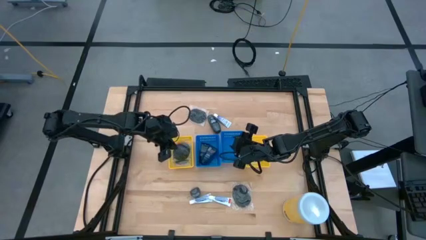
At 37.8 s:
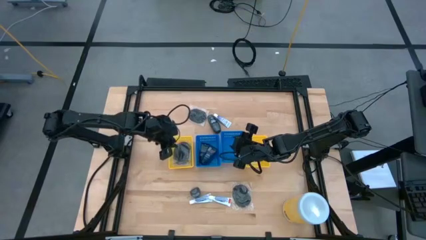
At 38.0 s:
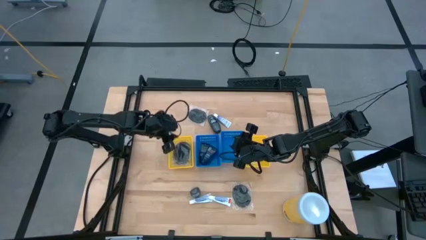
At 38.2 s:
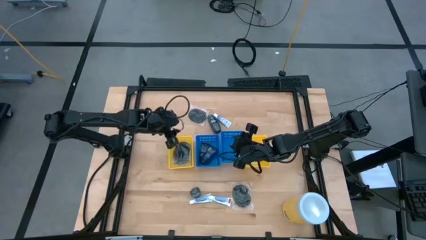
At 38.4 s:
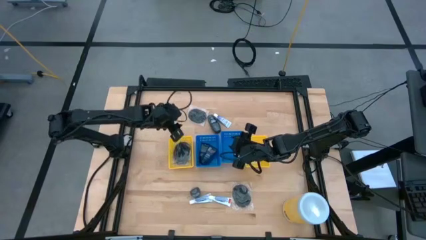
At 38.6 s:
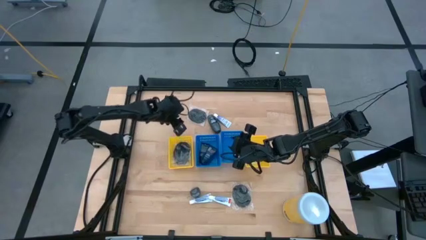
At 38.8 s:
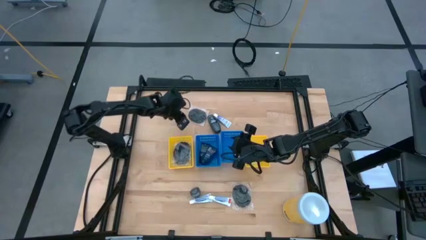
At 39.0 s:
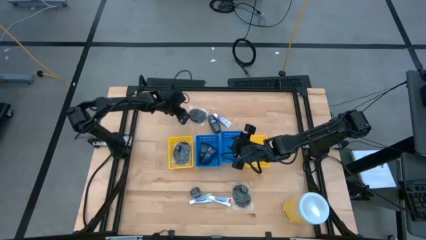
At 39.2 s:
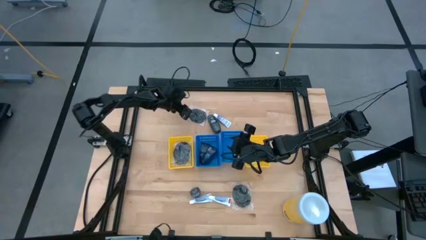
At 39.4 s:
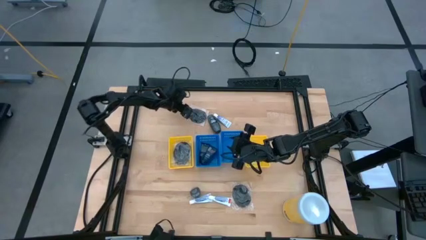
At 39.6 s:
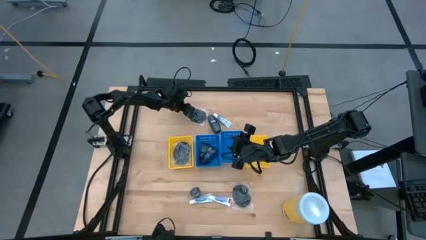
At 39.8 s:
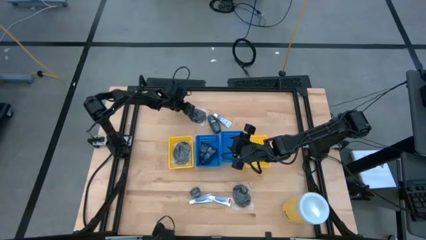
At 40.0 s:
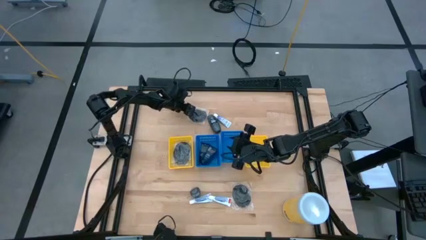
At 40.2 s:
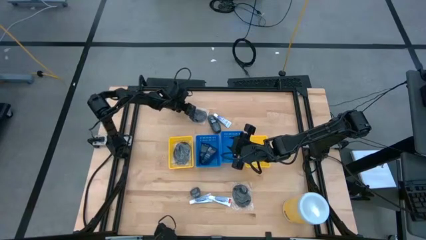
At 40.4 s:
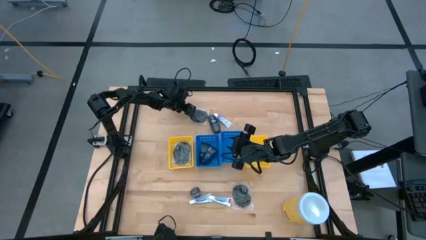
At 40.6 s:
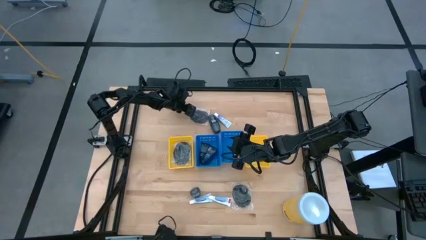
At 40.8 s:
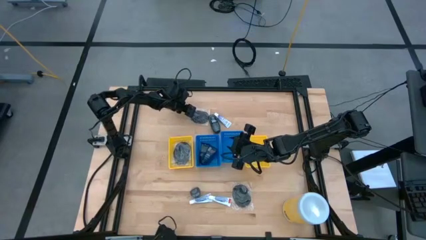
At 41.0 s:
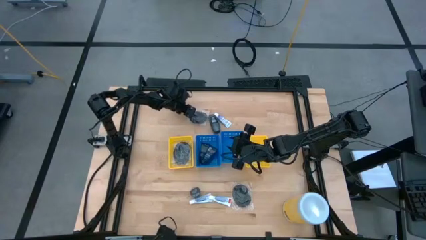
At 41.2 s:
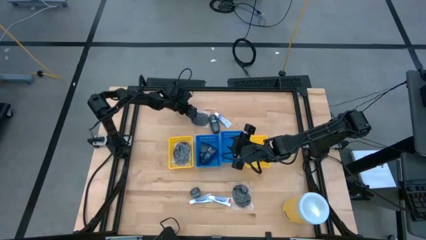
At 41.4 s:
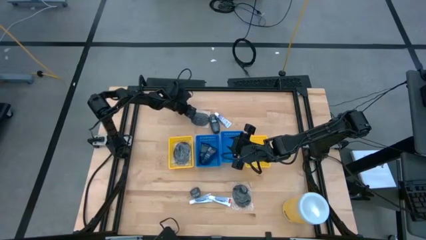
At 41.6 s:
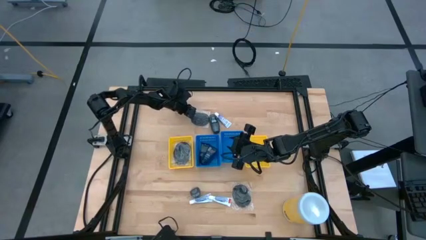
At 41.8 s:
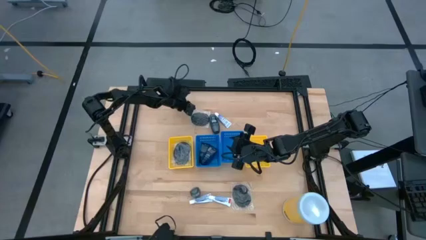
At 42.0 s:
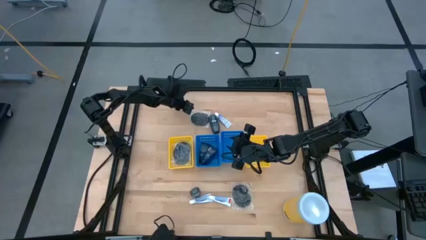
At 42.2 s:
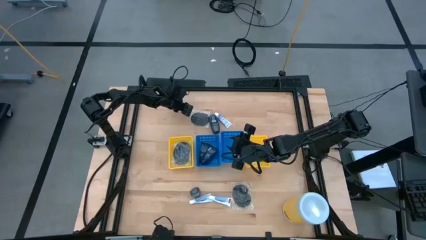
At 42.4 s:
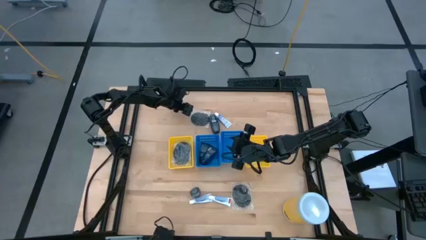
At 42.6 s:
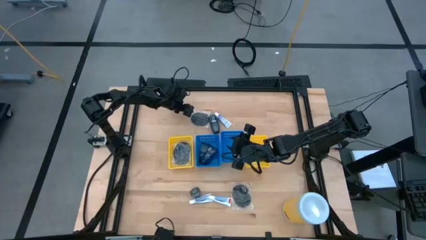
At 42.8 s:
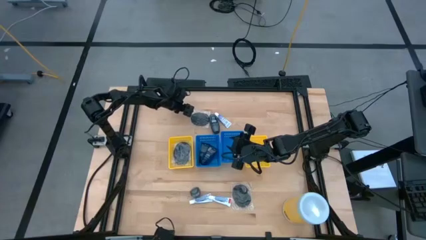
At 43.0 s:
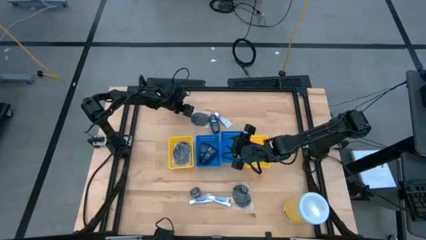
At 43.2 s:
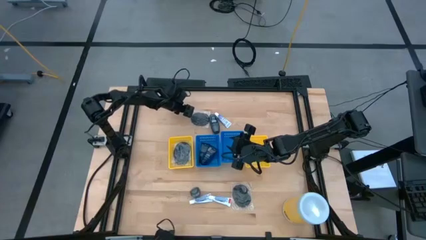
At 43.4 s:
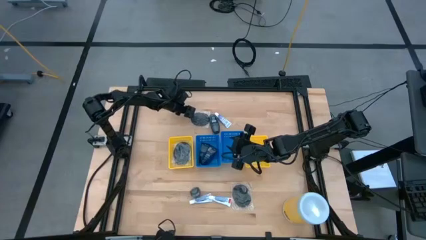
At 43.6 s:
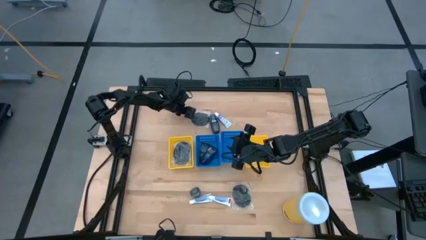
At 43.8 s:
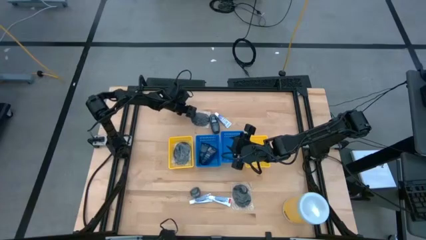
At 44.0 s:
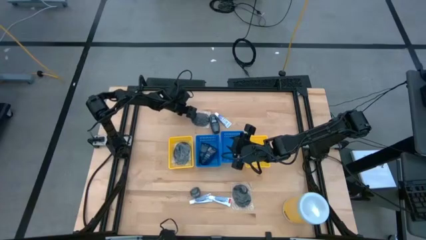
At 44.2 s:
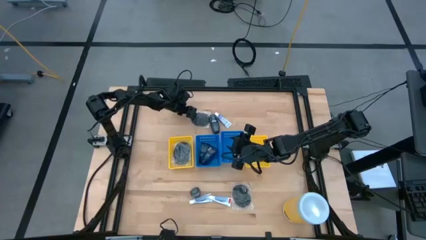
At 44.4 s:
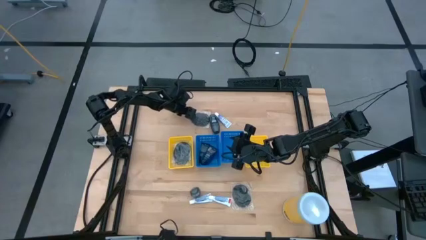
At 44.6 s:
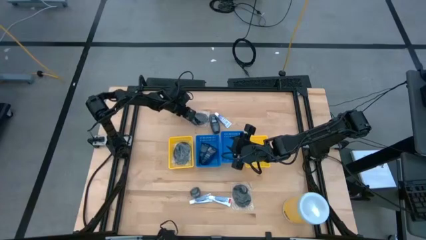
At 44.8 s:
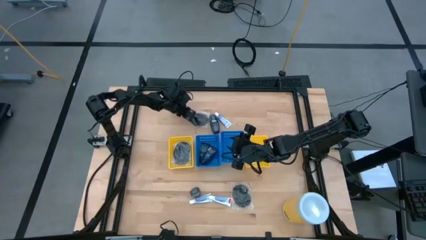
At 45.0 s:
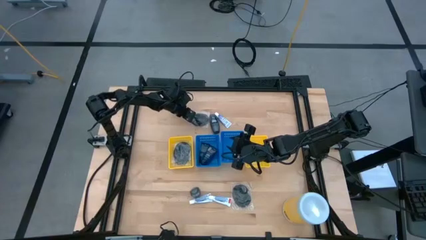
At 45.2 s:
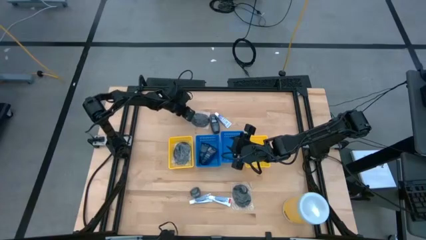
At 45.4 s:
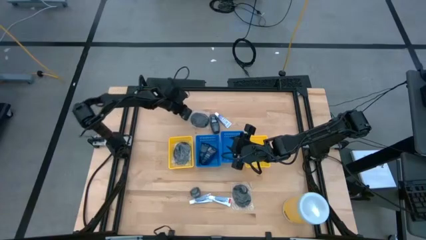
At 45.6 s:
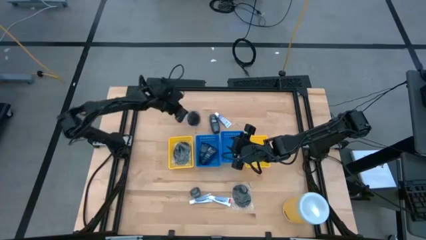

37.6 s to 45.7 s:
Task: Pick & Place Travel size toiletries
Put the hairbrush into the left yellow bin

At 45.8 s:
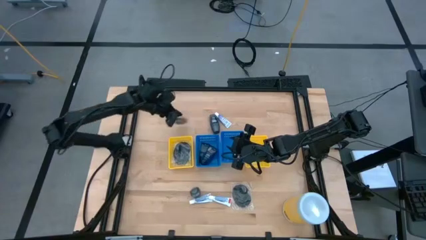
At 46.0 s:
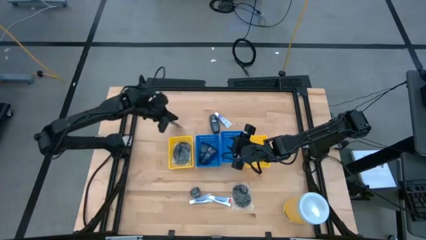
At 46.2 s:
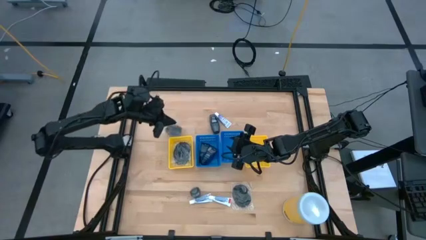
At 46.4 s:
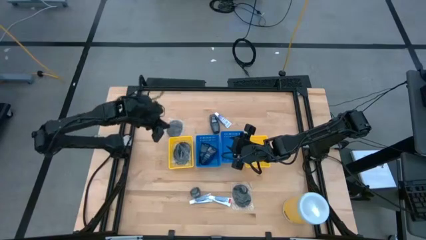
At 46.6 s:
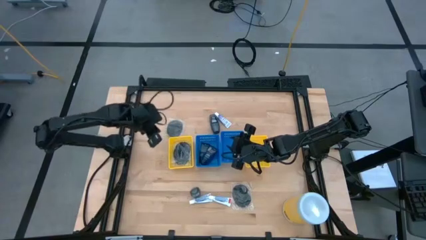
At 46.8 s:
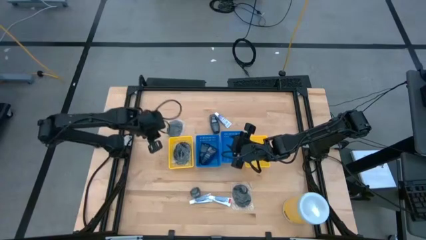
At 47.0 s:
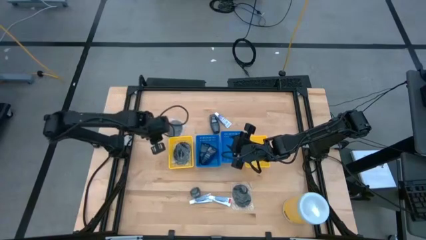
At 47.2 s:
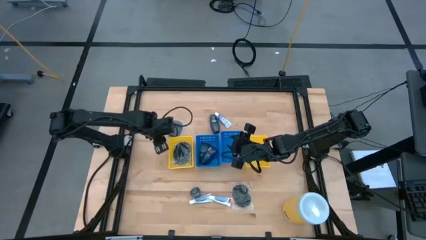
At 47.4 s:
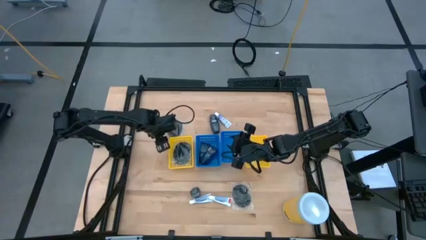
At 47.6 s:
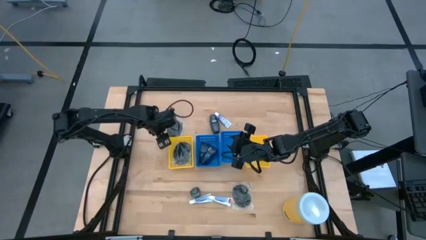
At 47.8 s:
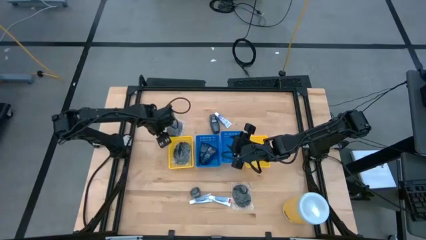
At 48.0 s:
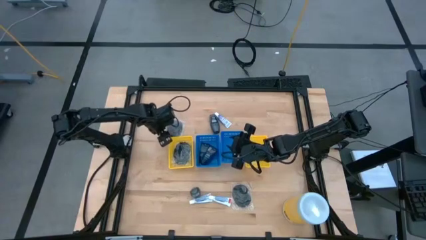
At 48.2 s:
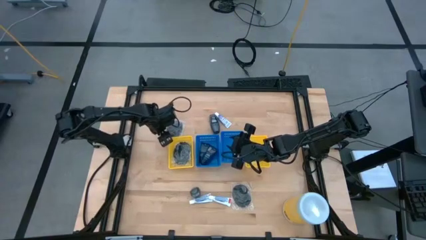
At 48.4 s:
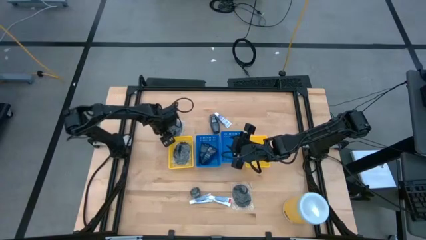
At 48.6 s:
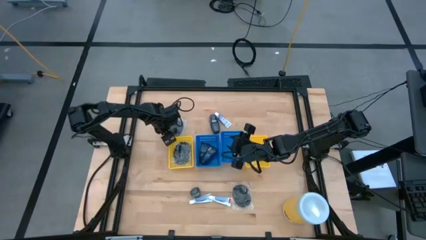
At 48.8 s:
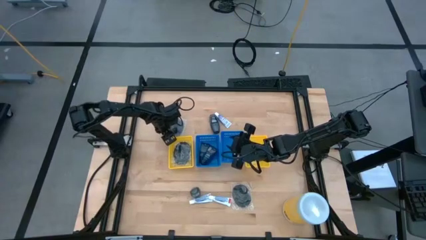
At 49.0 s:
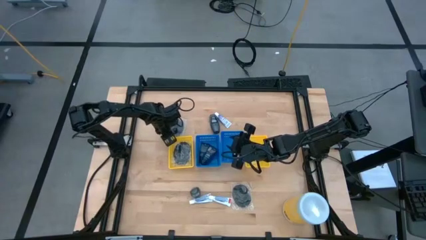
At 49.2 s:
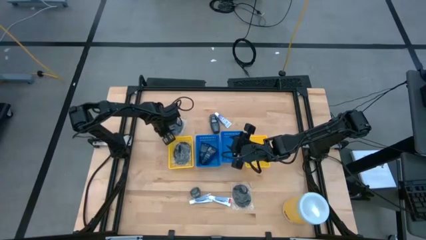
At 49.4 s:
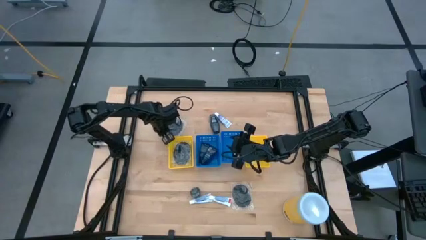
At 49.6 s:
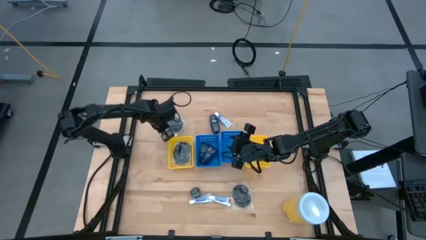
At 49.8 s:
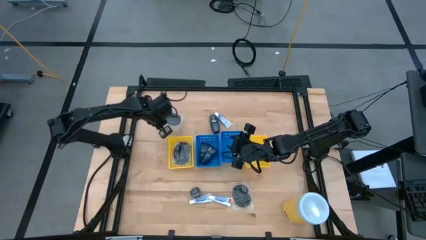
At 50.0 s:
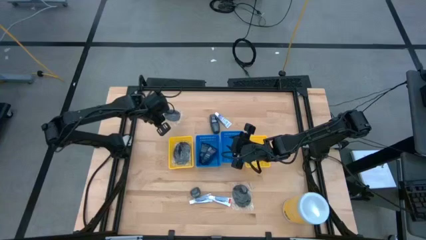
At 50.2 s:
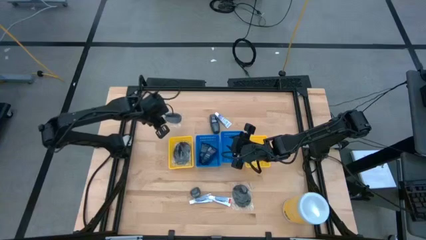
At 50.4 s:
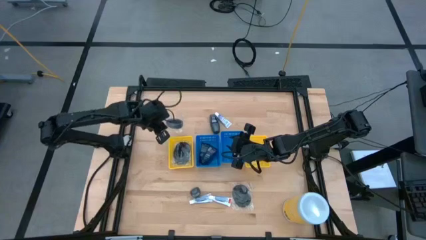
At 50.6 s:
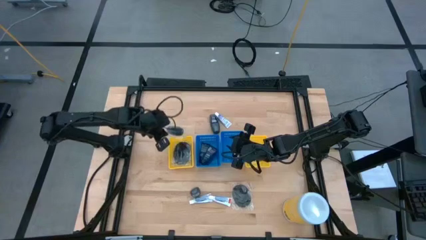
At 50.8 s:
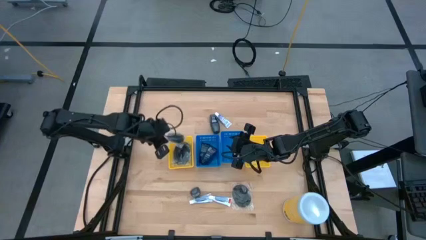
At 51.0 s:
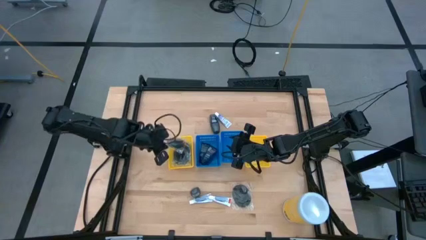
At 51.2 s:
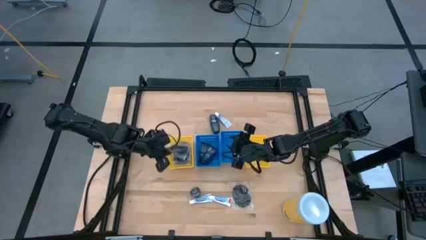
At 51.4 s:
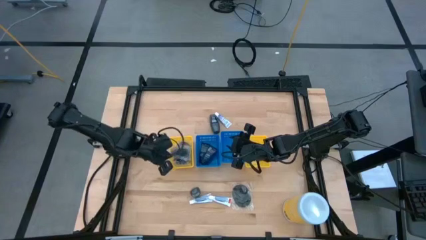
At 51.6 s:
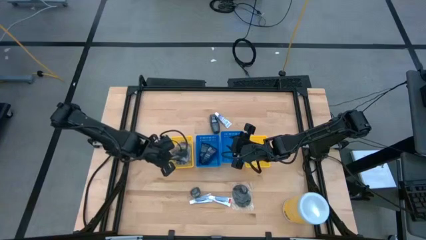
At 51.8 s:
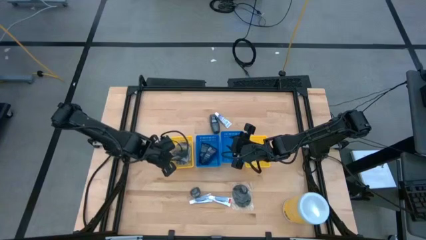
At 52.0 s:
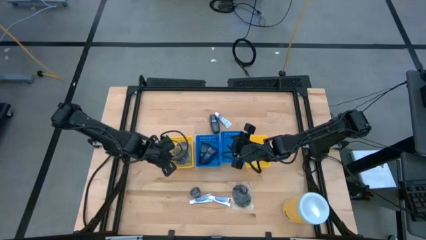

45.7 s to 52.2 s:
Put the hairbrush into the left yellow bin

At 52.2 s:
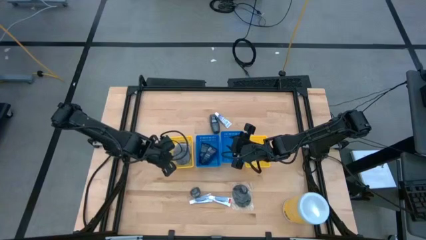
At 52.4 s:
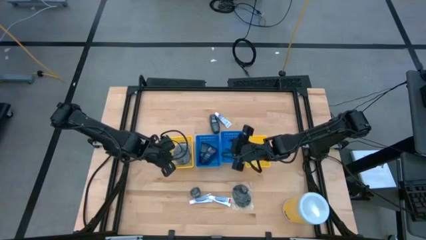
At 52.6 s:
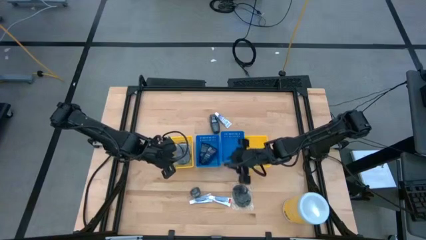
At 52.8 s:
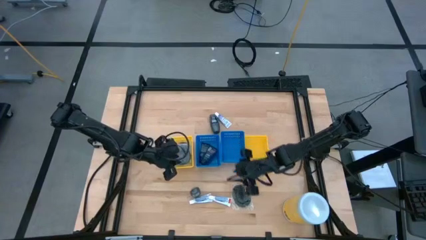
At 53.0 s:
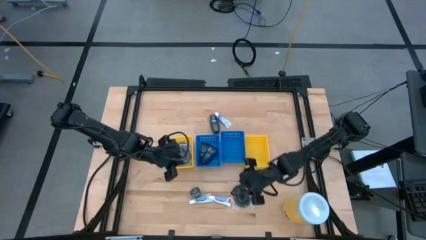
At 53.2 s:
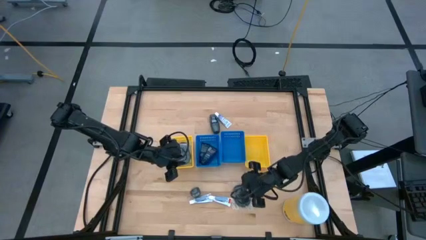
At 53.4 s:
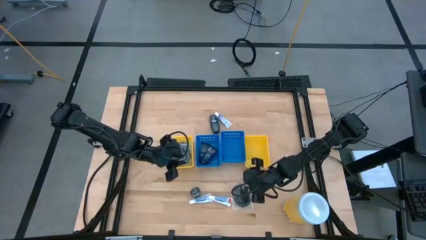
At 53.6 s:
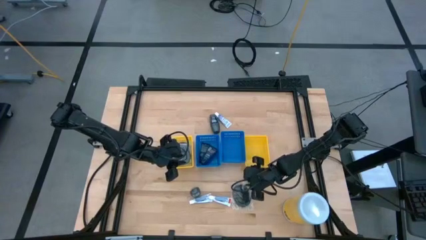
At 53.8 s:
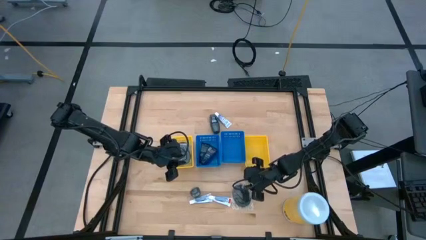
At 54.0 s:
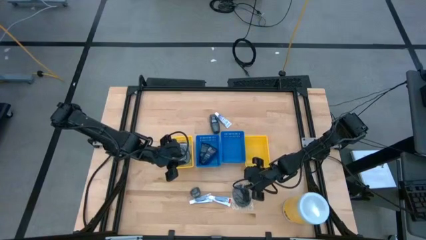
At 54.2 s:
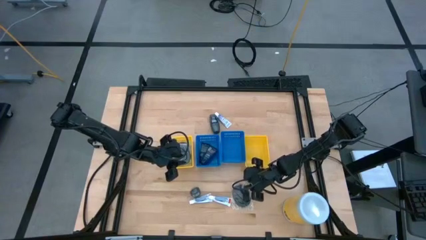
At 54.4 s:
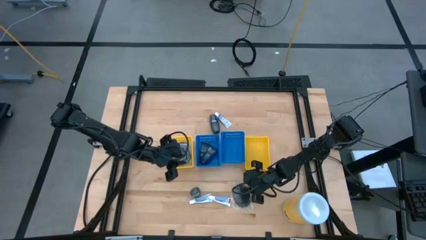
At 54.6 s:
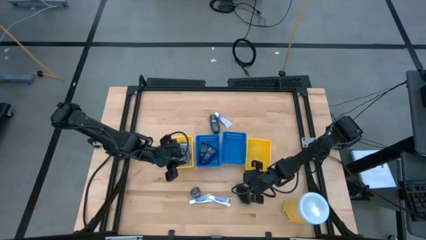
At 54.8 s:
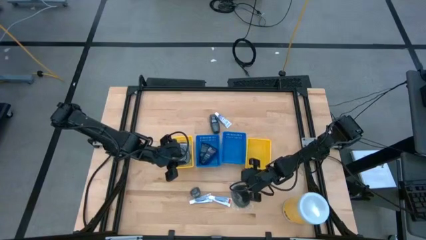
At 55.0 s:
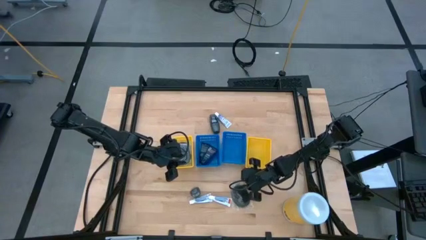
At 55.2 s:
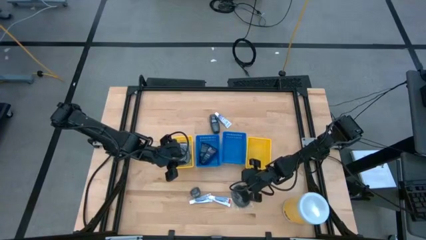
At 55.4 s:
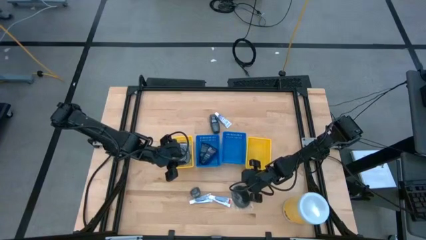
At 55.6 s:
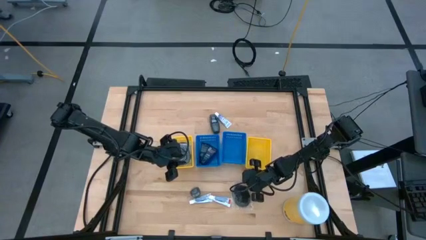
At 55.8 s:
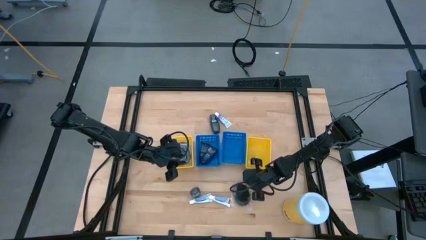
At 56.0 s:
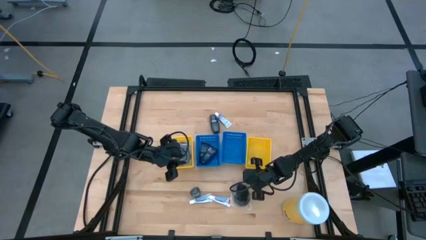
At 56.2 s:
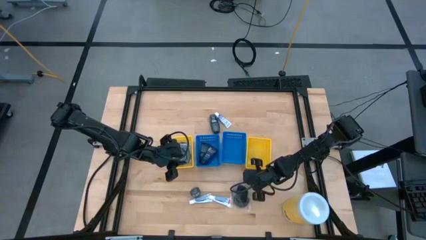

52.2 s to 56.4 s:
Put the hairbrush into the left yellow bin
